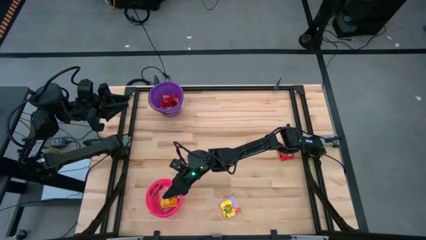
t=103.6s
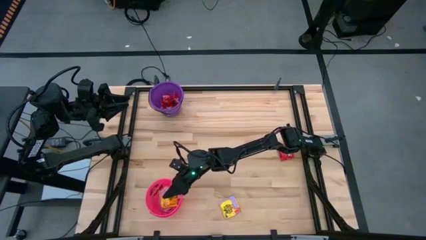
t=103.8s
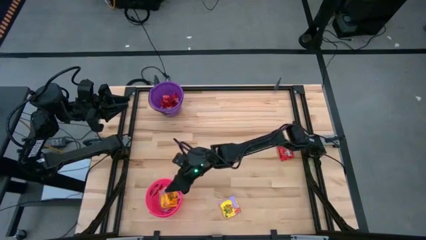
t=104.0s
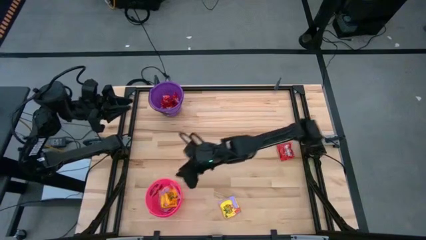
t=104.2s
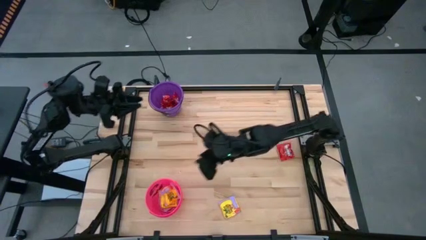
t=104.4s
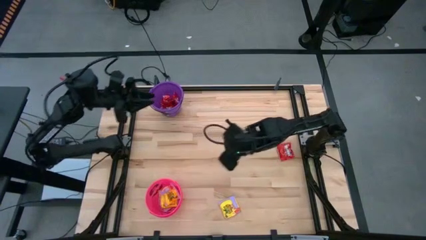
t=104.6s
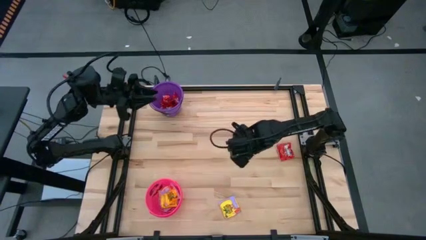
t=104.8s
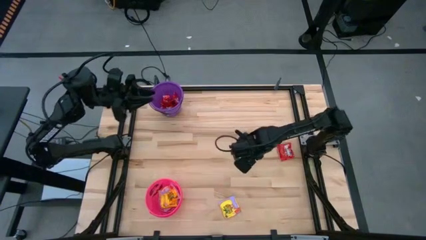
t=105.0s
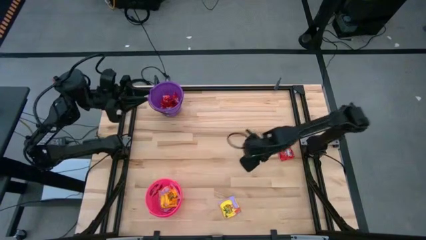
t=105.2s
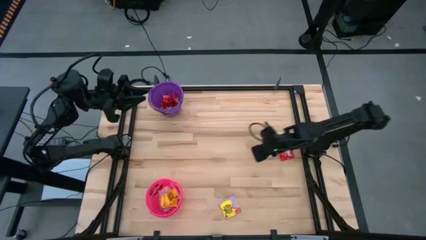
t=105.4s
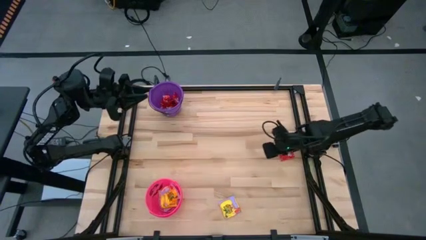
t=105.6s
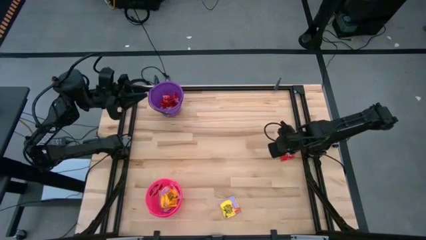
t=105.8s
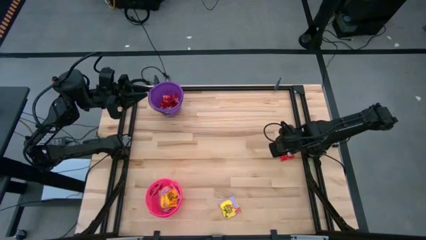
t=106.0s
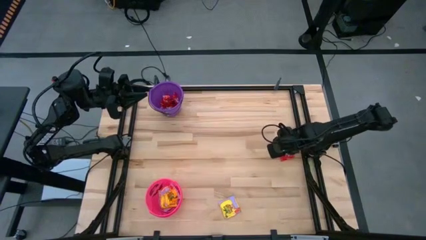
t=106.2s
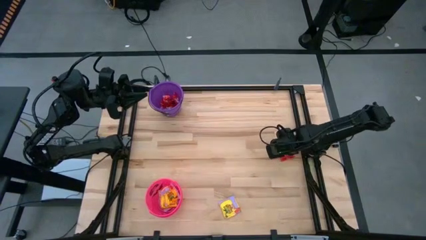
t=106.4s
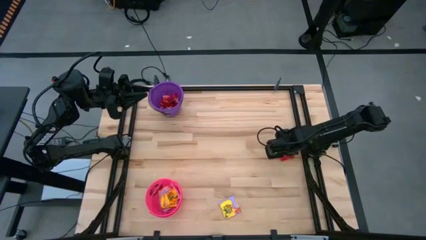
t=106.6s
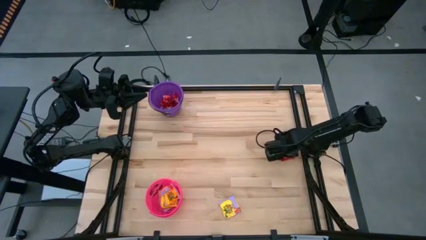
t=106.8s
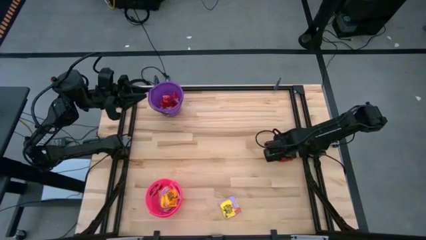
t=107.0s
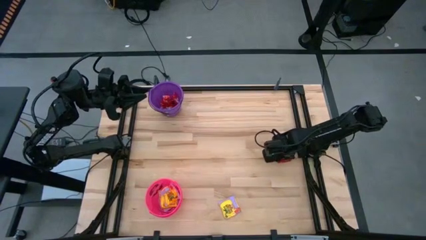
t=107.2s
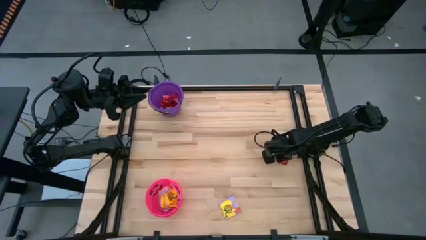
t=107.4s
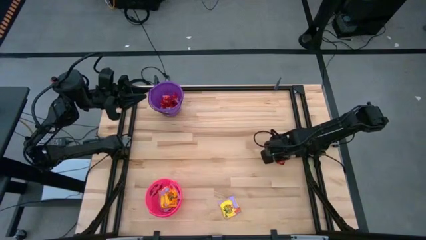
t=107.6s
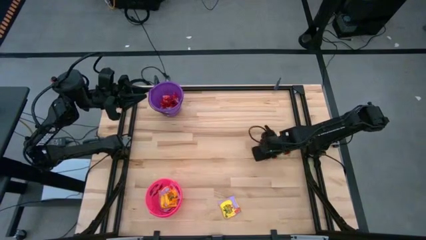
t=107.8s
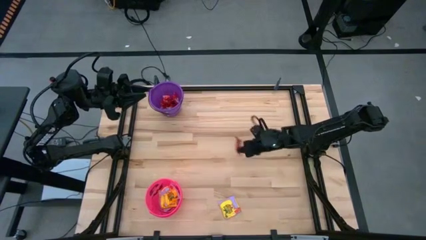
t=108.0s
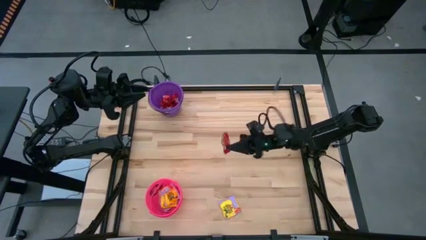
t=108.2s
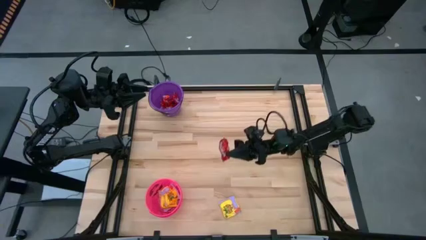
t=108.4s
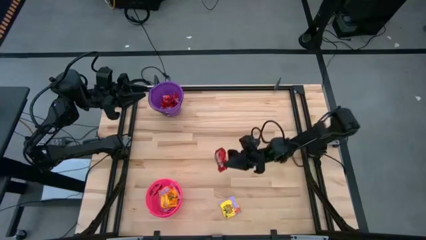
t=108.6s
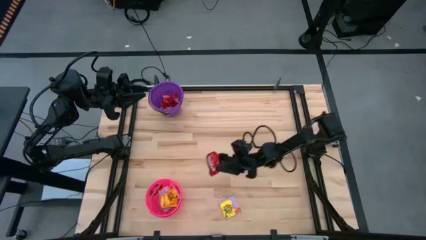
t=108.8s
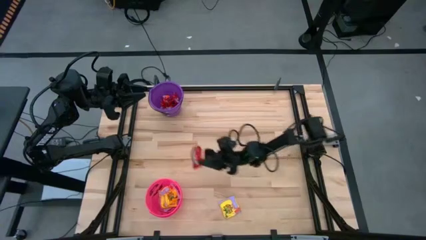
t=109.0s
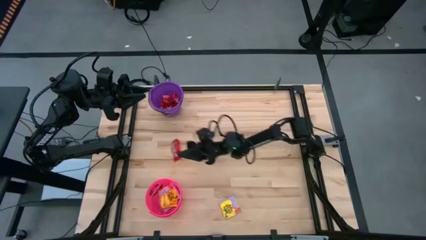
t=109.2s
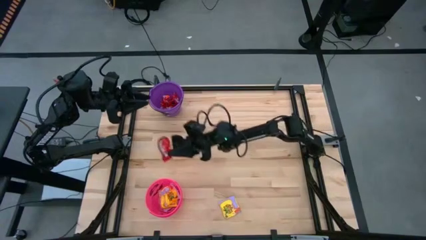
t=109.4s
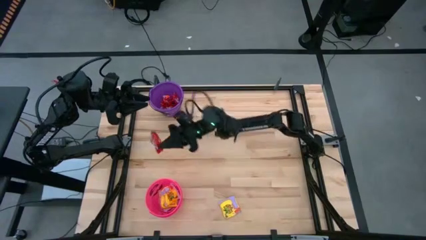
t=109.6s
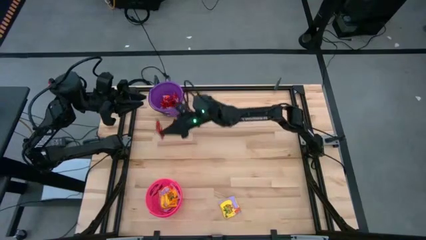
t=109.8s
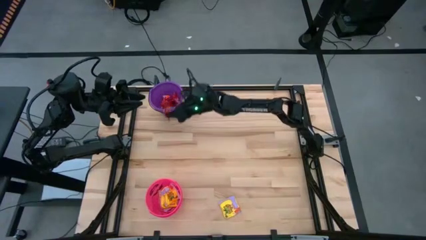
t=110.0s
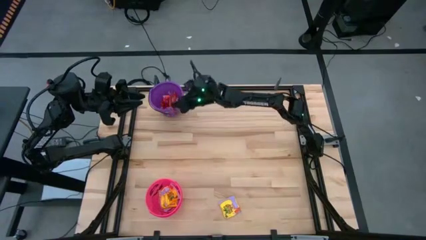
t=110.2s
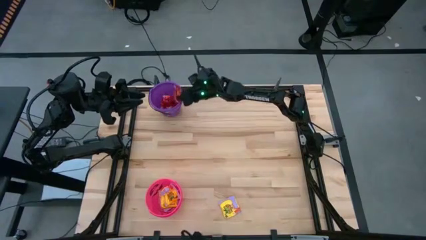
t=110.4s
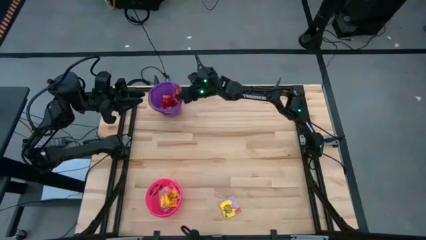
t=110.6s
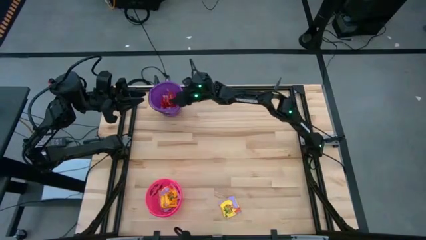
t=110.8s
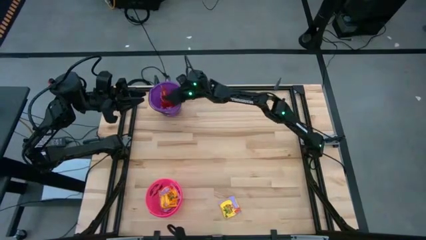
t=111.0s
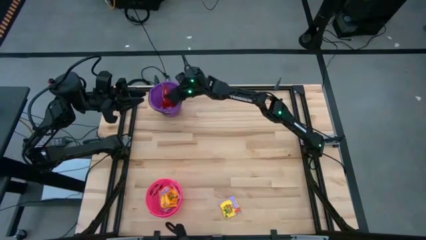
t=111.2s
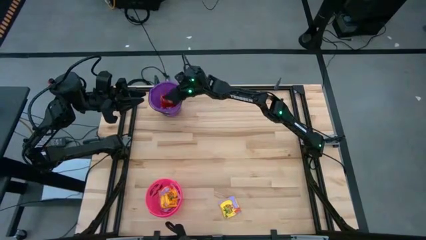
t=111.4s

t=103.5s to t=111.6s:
Task: Sort candy by brand, put in halloween buckets
Put the red candy into the purple bucket

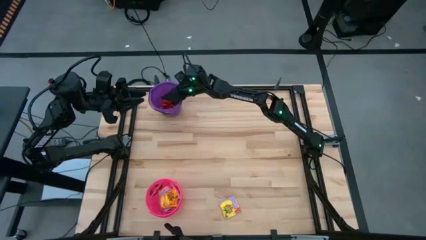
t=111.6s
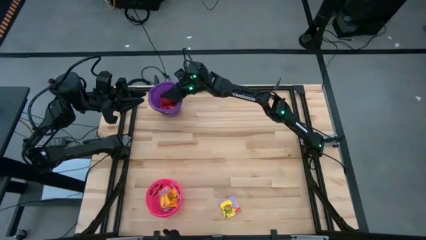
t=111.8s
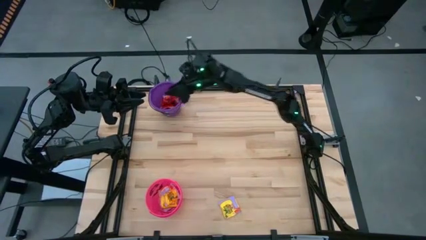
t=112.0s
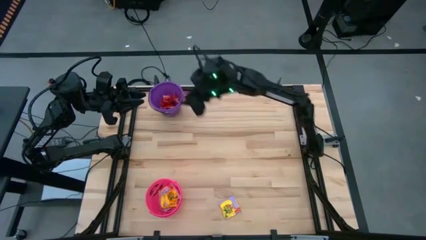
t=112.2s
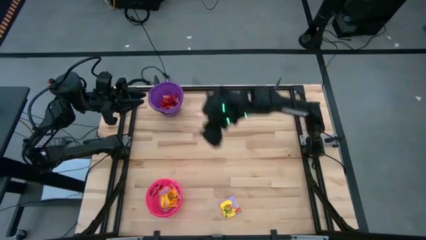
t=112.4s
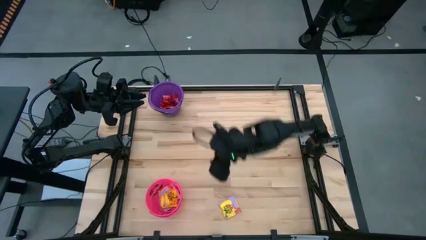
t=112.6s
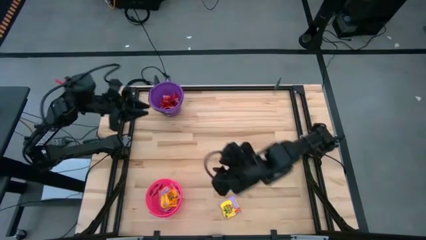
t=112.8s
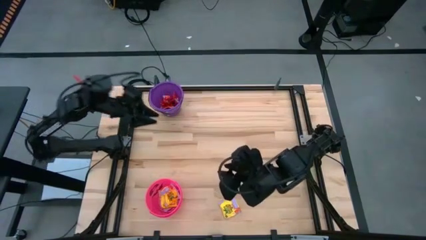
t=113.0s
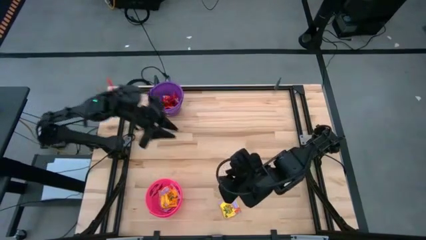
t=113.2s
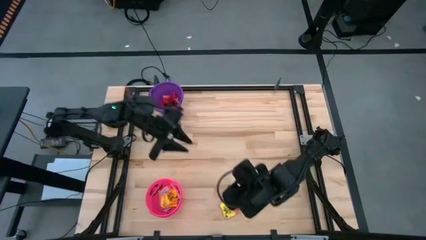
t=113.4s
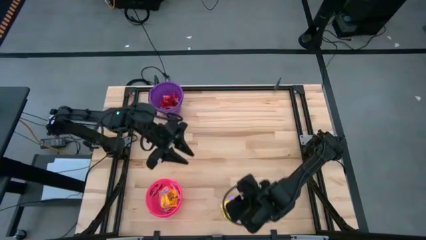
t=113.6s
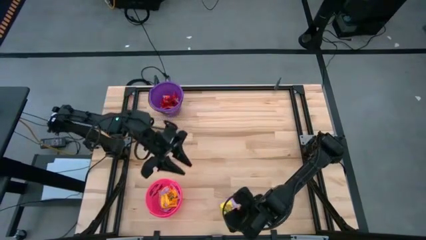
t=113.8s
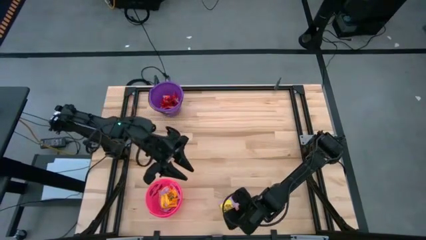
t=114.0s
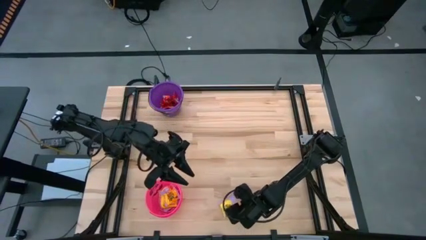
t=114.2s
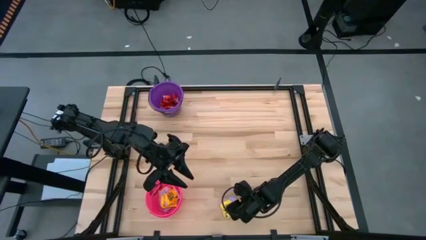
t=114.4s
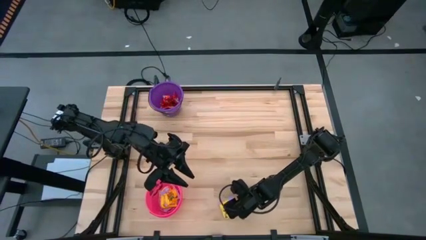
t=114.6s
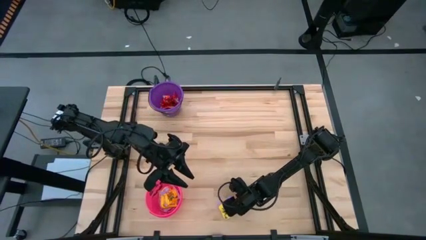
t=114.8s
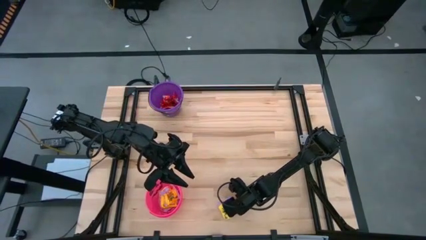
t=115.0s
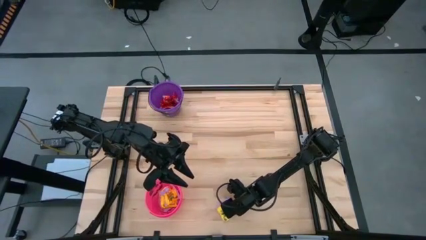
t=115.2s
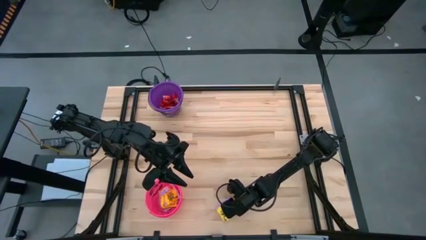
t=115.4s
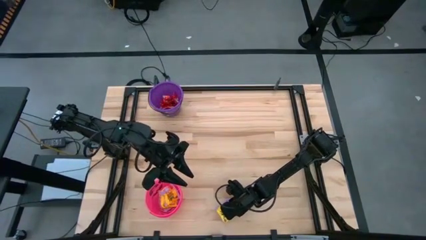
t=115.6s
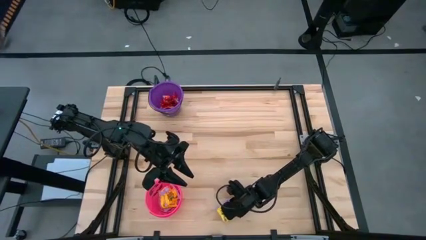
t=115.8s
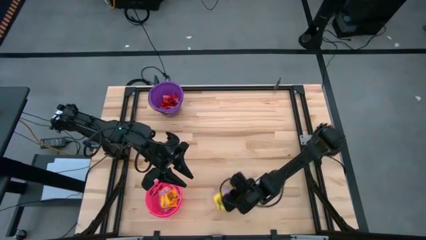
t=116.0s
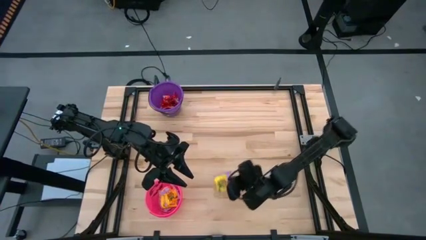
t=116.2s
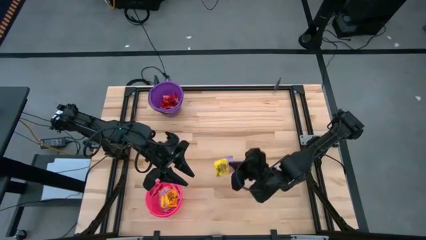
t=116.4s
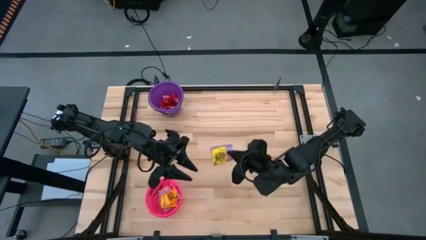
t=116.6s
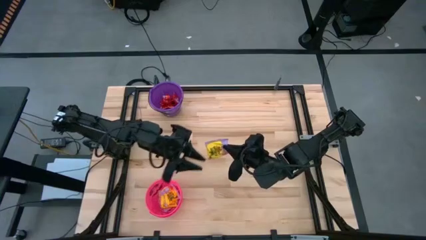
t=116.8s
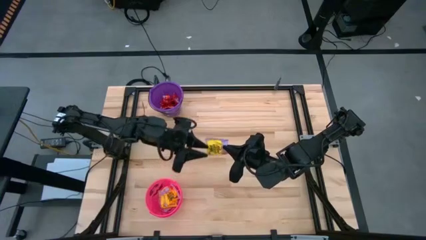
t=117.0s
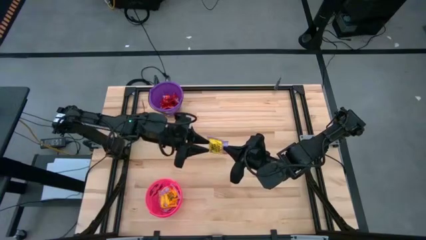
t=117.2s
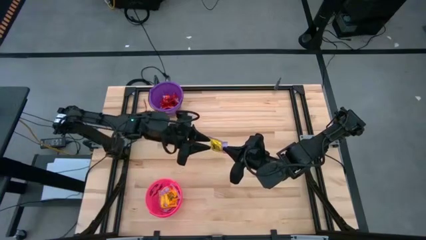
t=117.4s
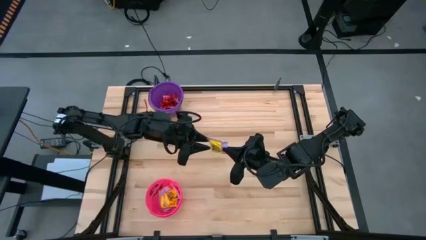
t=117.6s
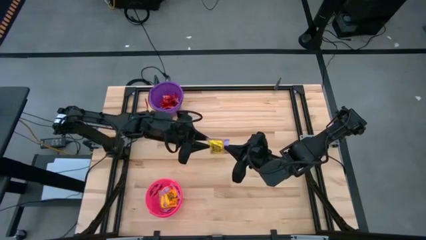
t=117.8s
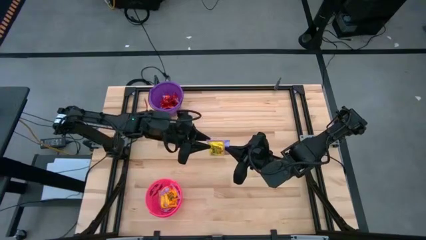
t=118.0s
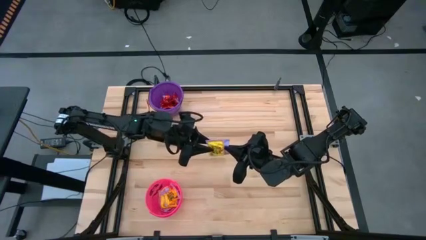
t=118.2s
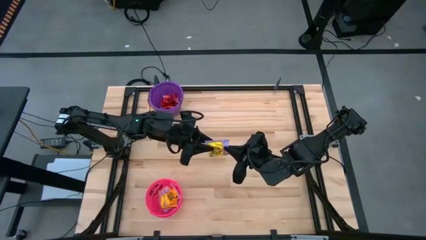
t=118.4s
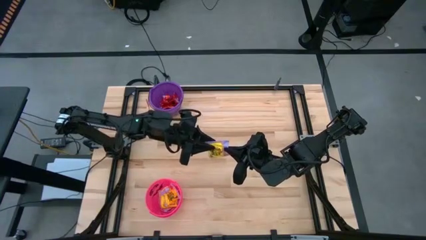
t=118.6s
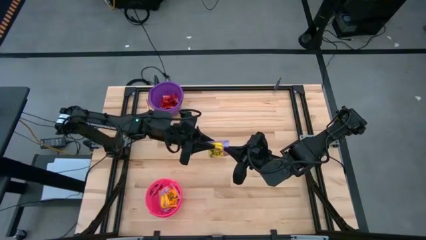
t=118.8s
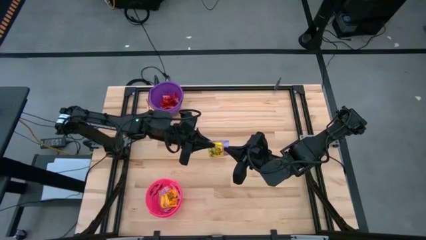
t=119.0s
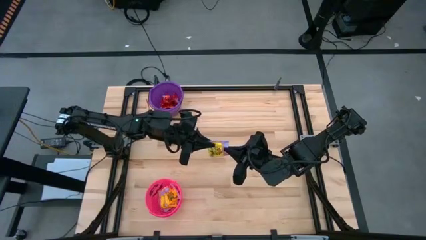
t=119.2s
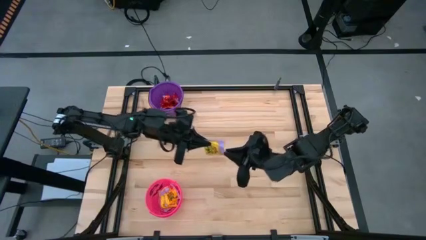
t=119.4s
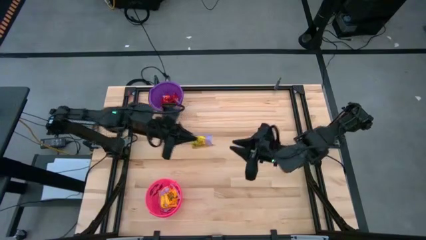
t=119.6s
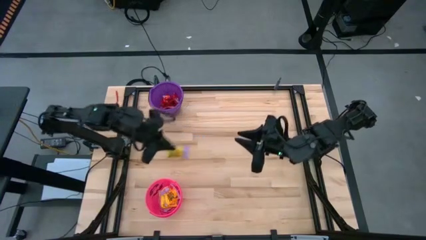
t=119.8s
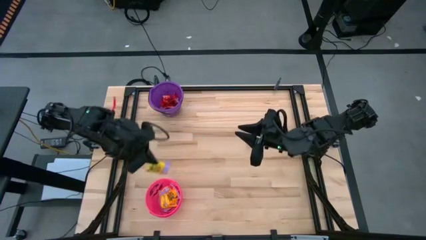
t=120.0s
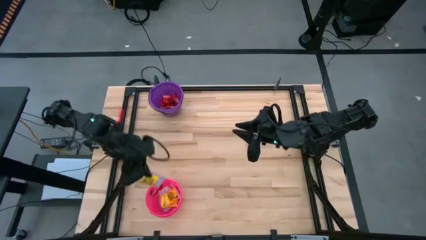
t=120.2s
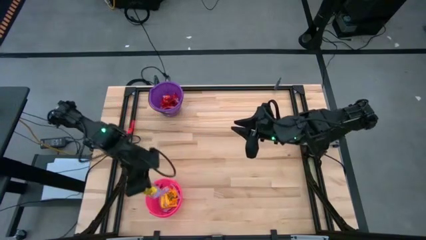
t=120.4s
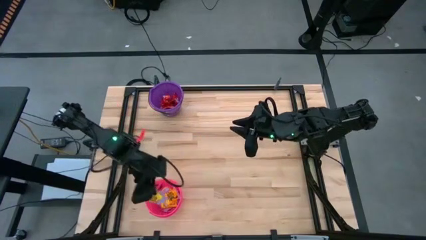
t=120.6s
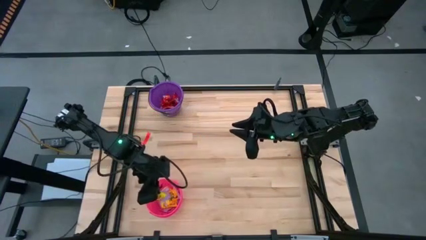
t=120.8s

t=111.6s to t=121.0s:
Put the yellow candy into the pink bucket
